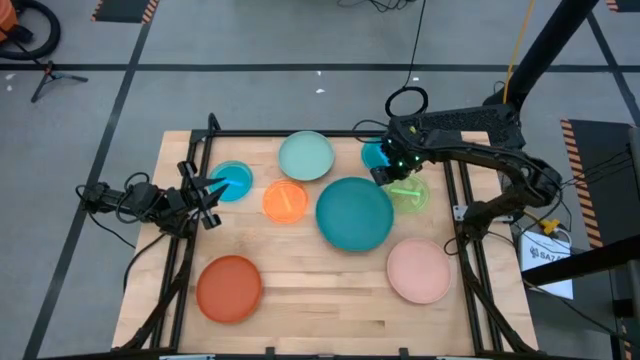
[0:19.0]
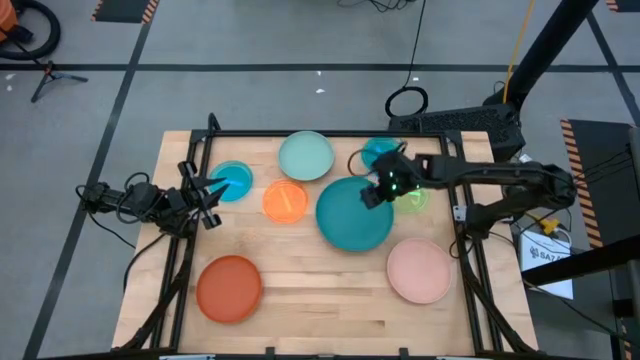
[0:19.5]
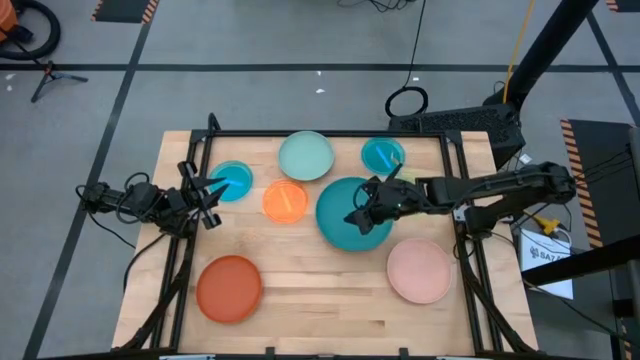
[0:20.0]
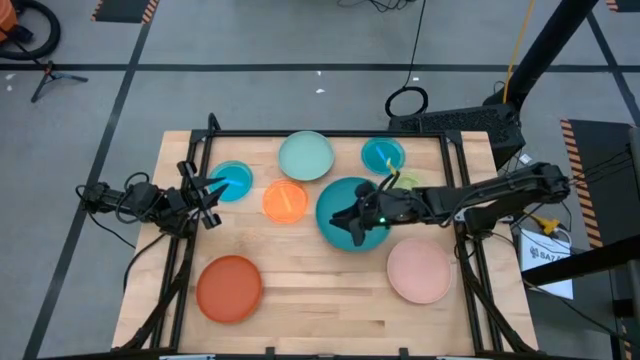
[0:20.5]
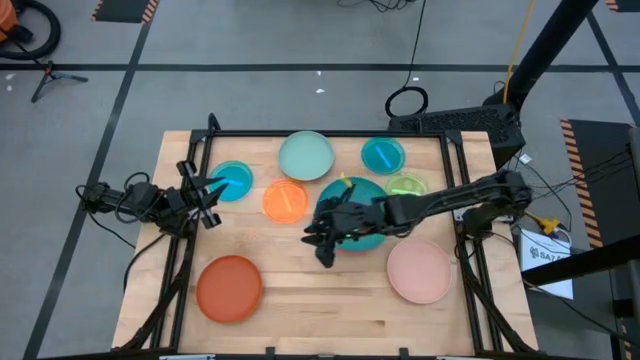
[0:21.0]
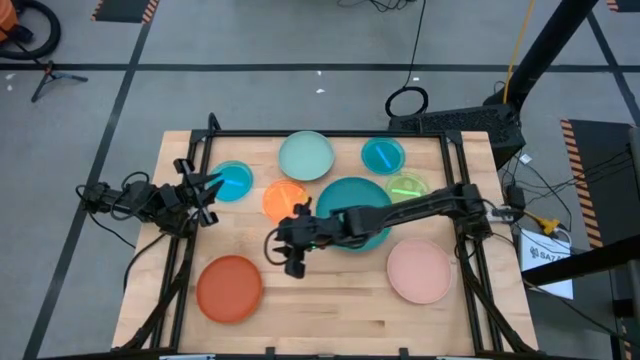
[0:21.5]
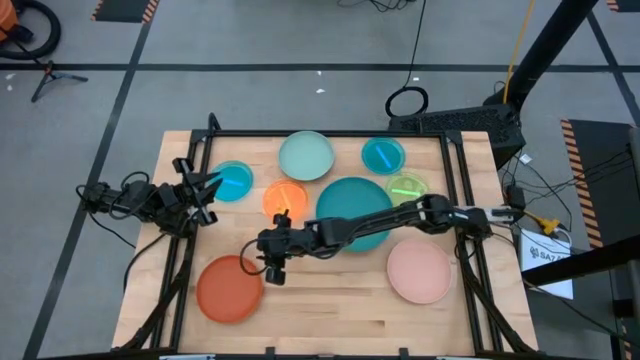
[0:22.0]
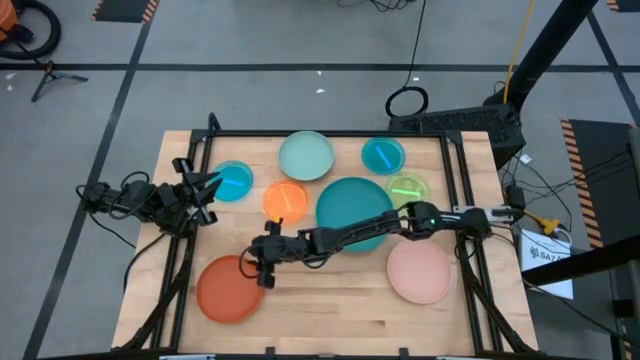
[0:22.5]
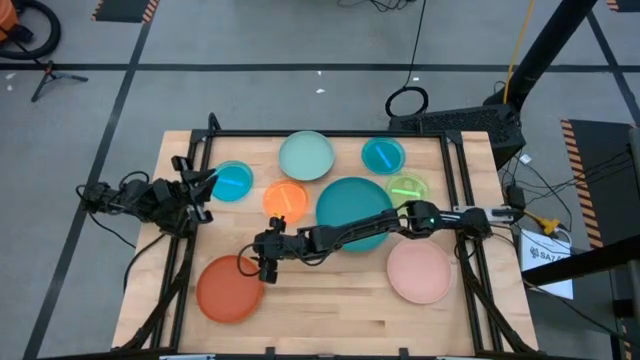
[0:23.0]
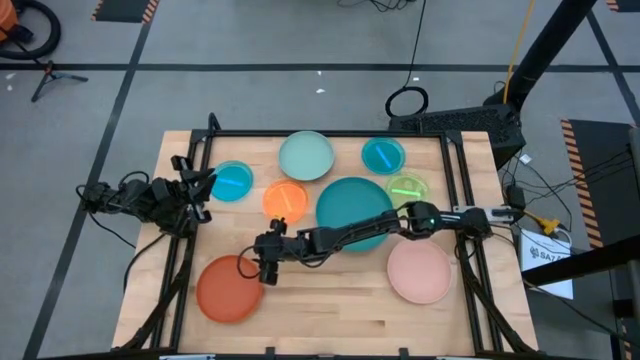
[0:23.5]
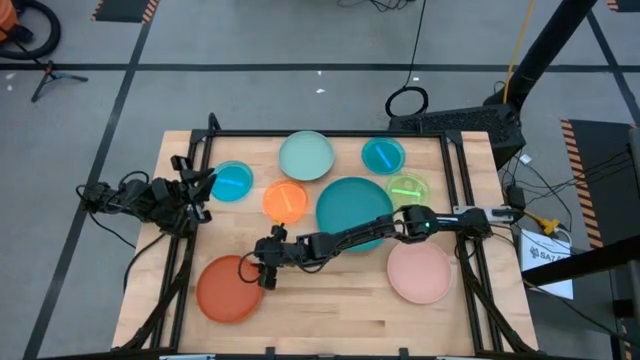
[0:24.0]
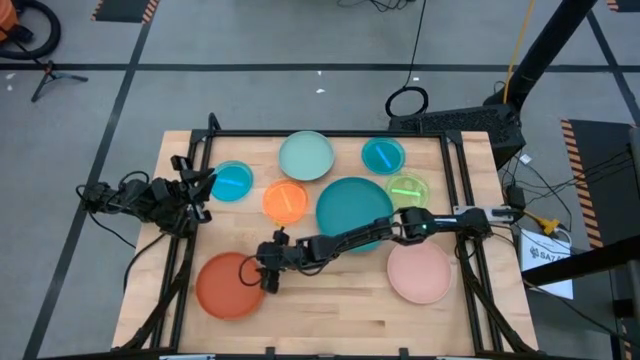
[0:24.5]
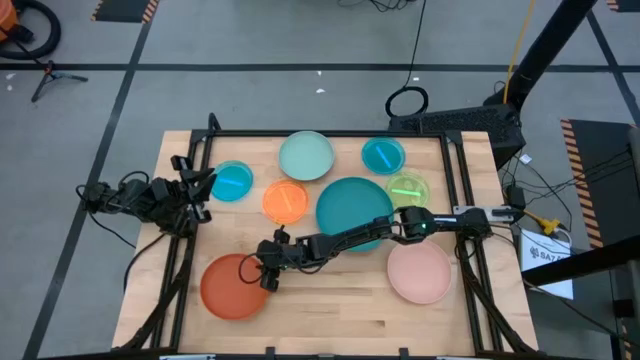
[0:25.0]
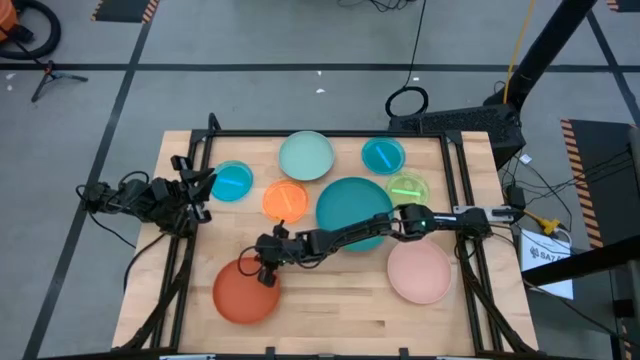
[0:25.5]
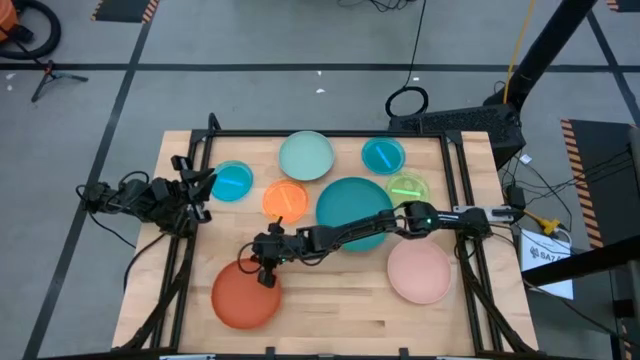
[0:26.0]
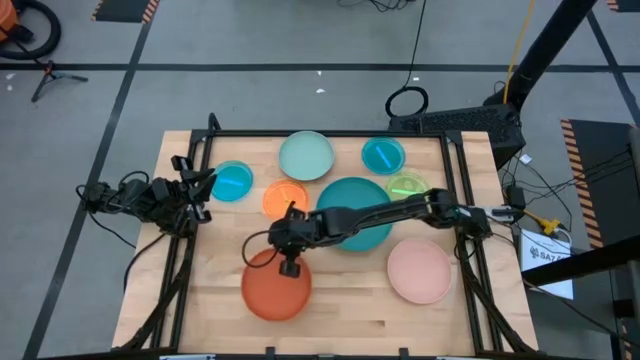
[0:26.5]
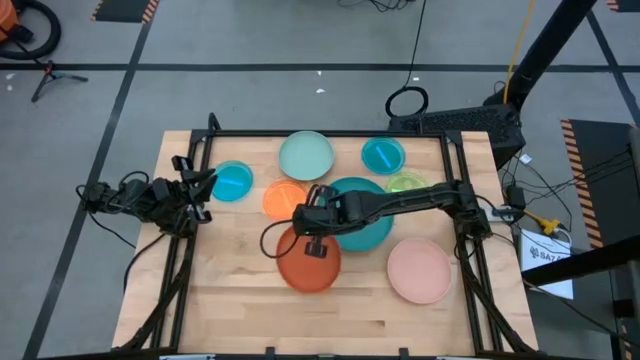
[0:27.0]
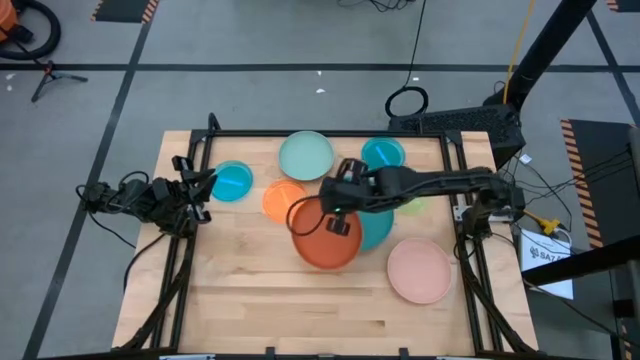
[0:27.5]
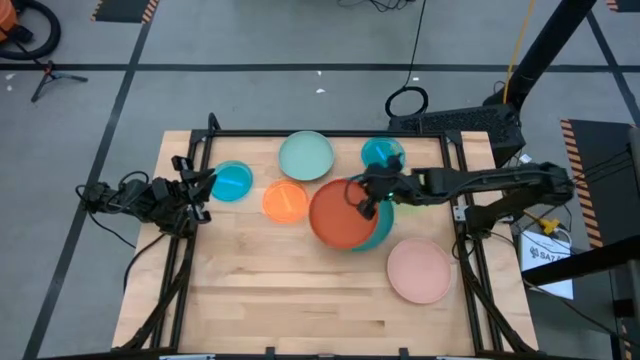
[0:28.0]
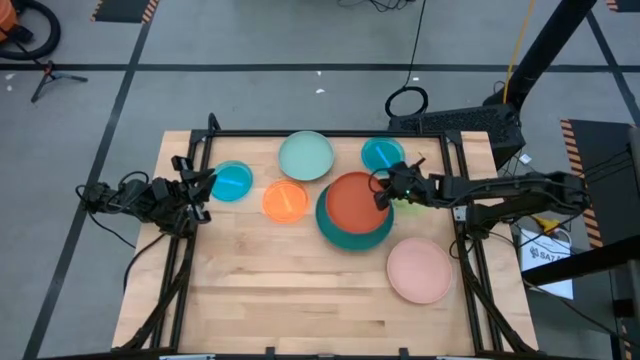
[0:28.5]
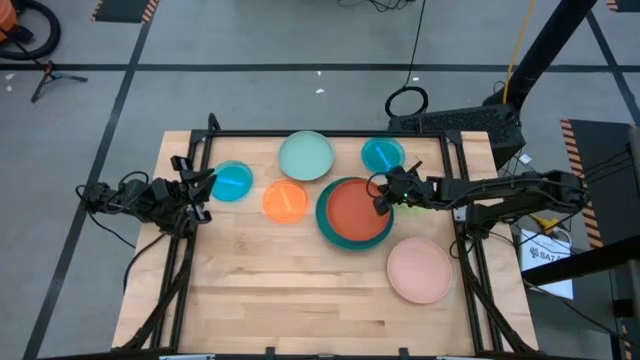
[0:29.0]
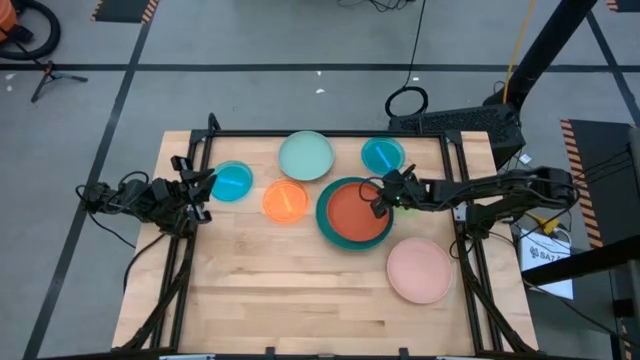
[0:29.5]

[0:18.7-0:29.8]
Task: Stack plastic plates
Stack the dark orange plate on top of the dark blue plate

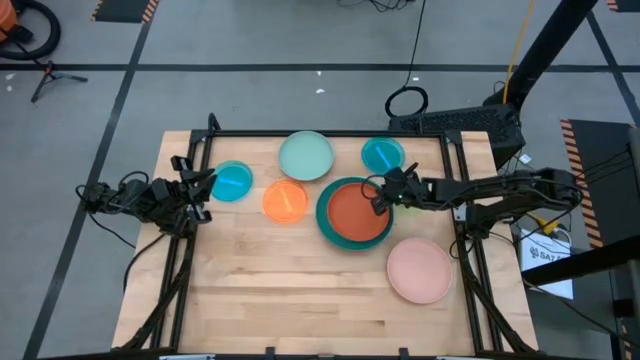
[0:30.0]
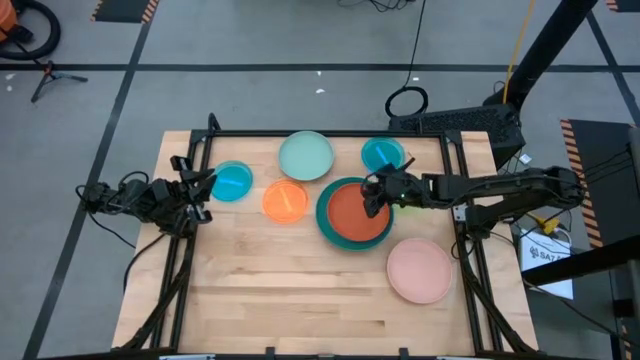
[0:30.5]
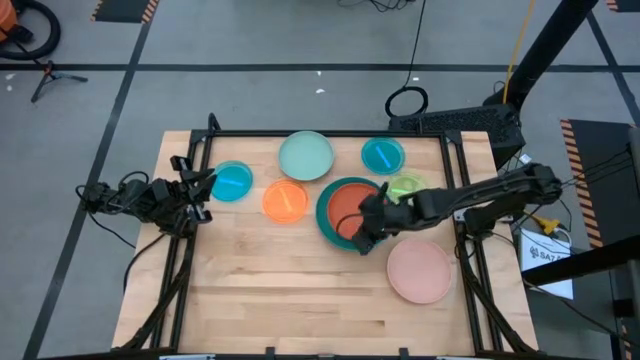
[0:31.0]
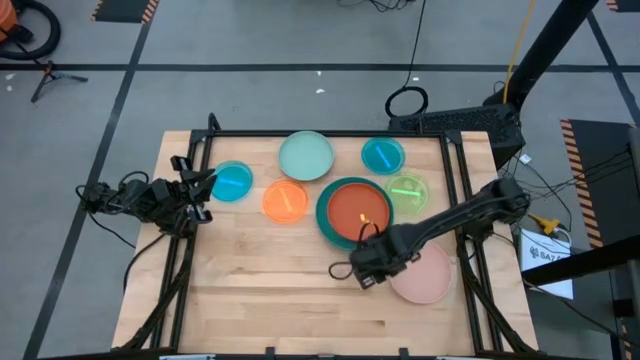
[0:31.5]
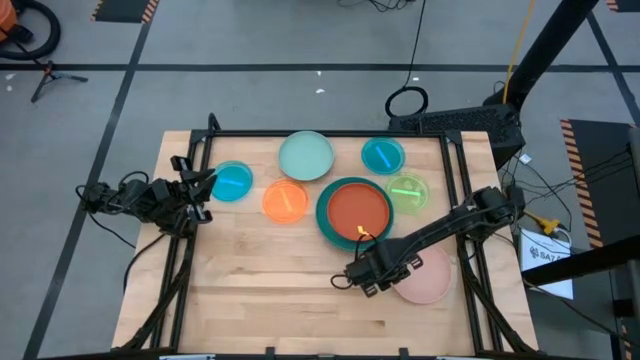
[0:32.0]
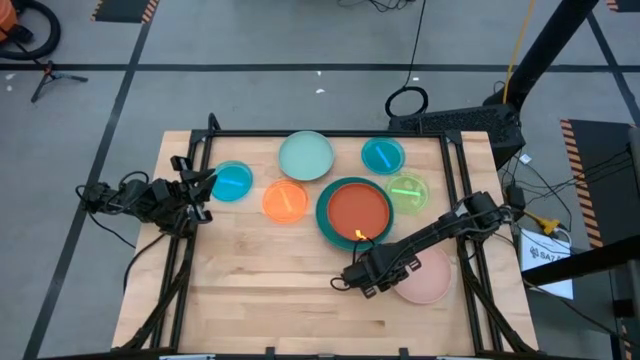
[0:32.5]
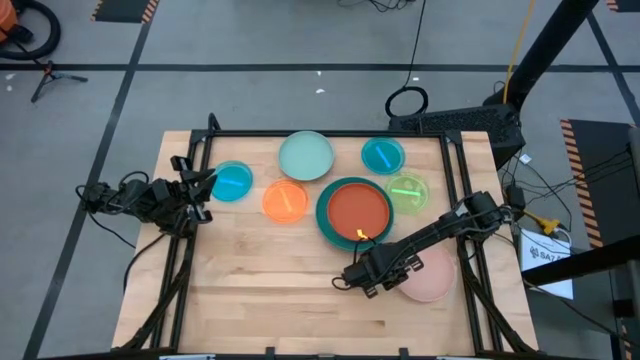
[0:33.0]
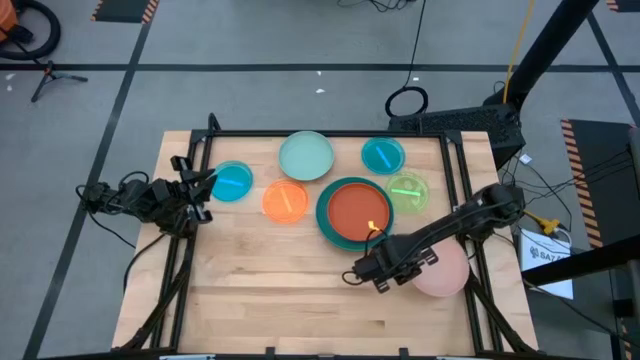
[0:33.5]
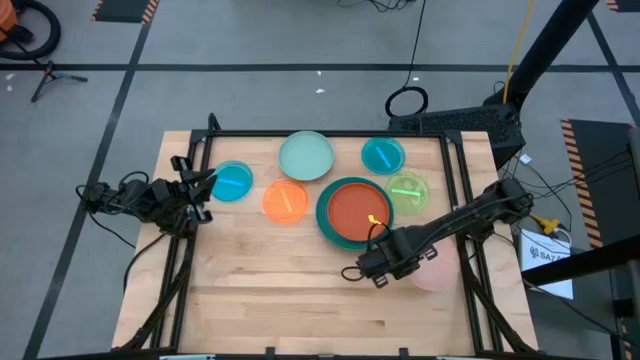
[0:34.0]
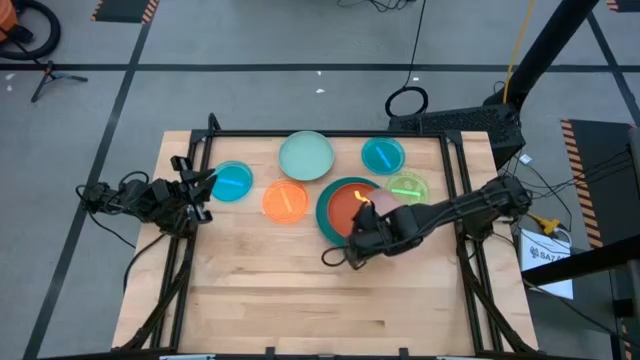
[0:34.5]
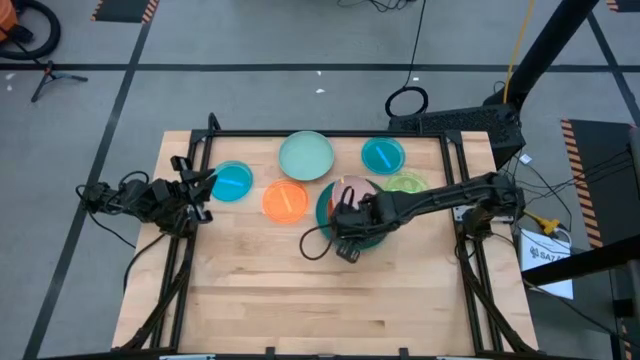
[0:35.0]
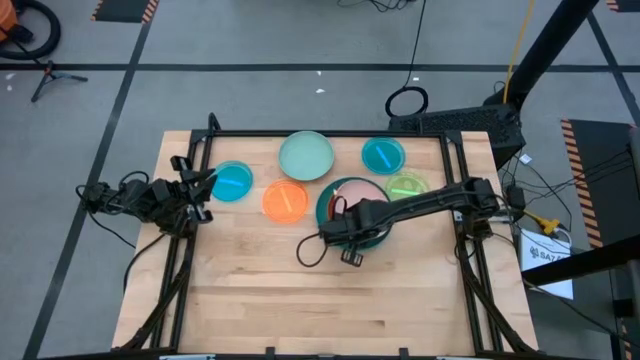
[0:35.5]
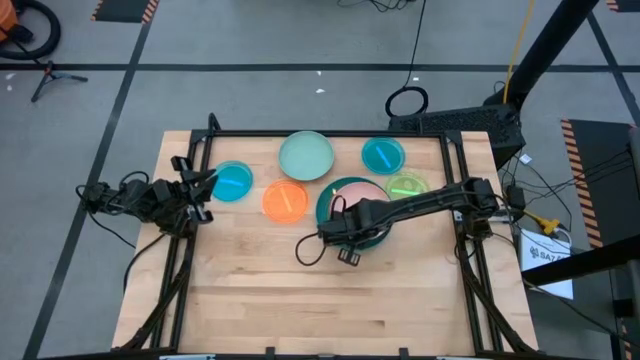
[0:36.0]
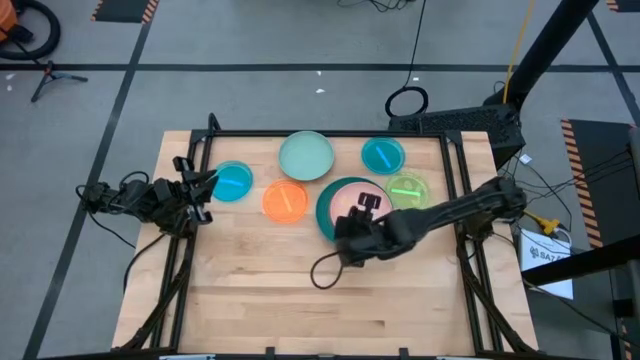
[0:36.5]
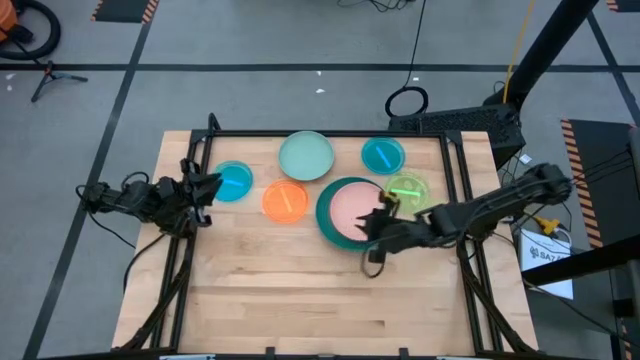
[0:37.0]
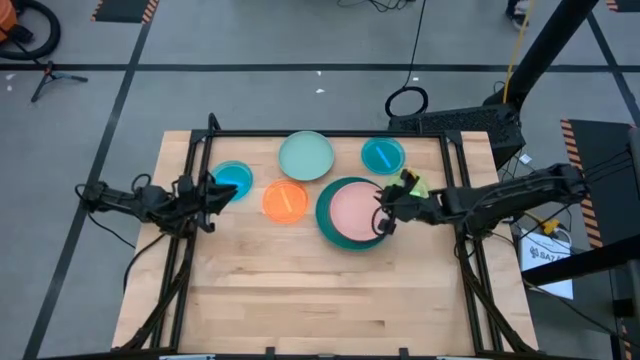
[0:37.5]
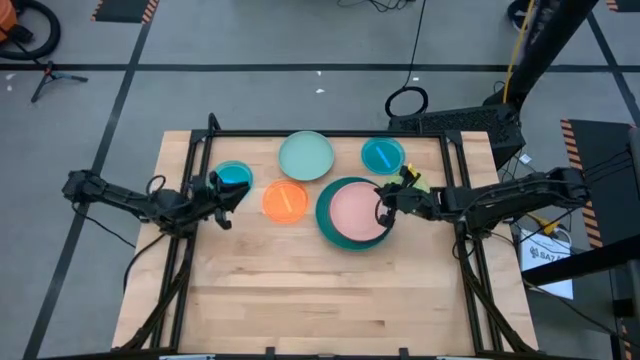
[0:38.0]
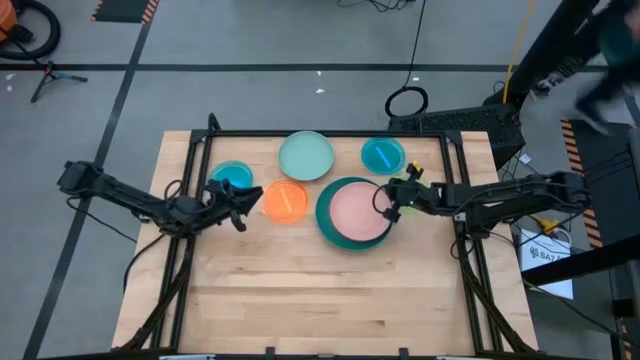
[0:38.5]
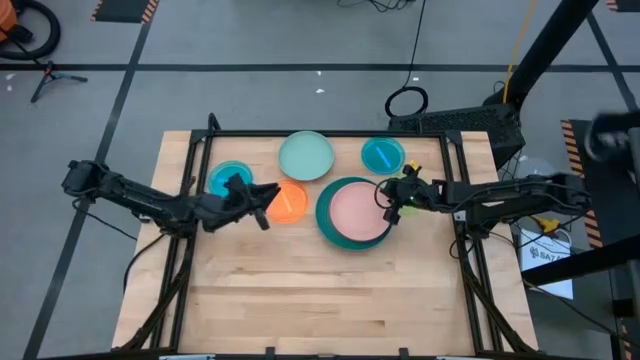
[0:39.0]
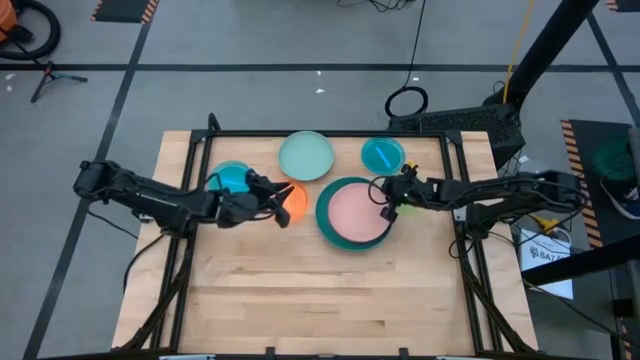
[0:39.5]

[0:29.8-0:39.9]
Stack the pink plate on top of the dark orange plate
